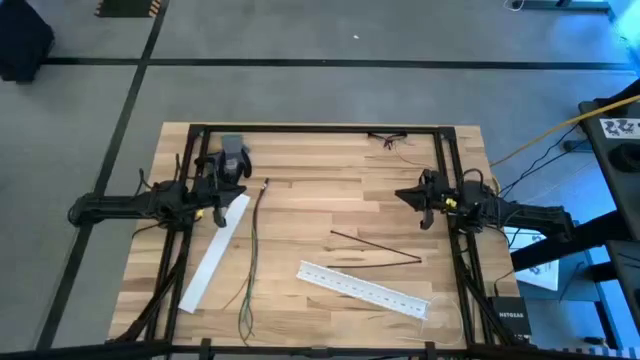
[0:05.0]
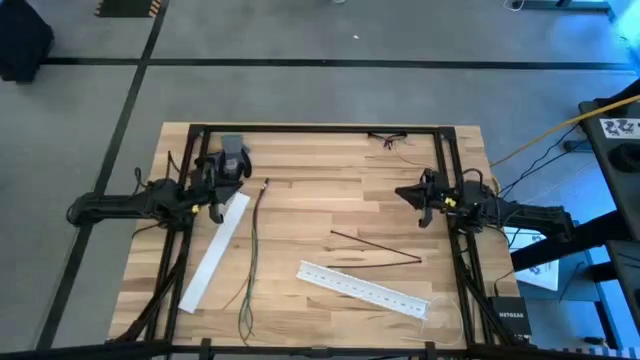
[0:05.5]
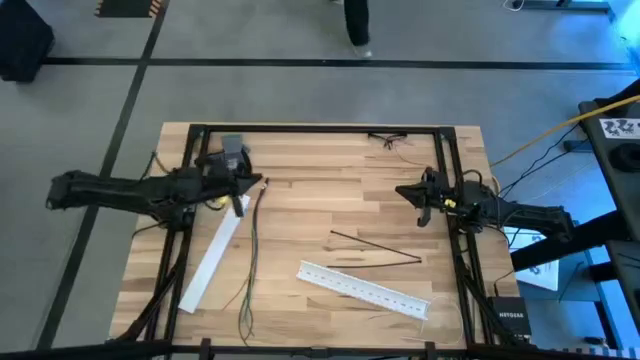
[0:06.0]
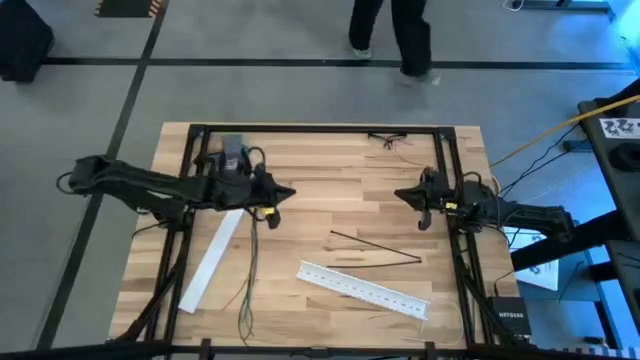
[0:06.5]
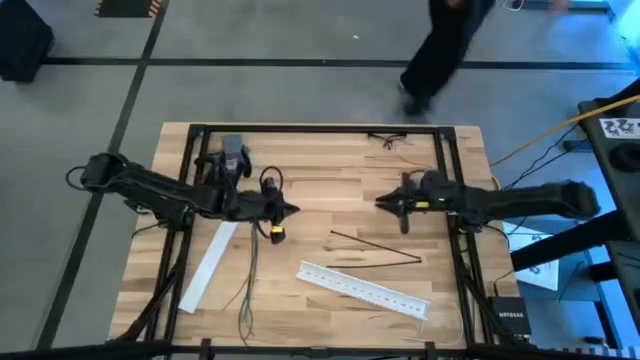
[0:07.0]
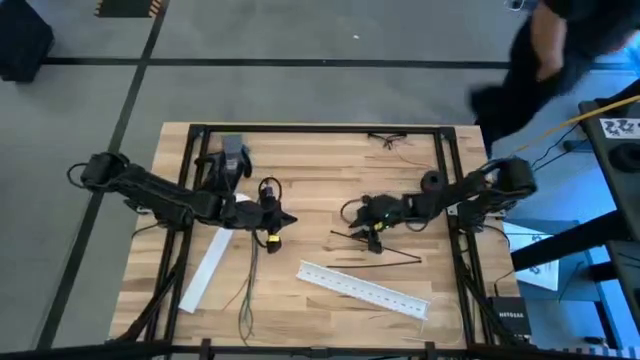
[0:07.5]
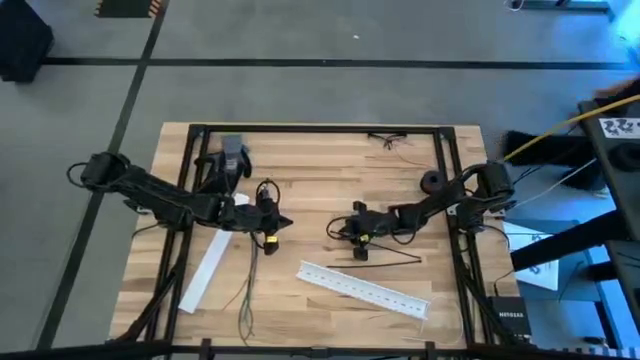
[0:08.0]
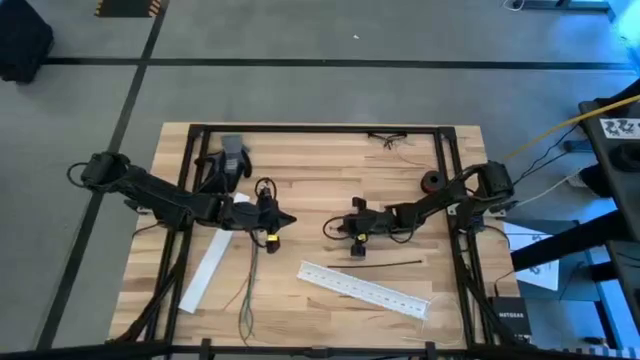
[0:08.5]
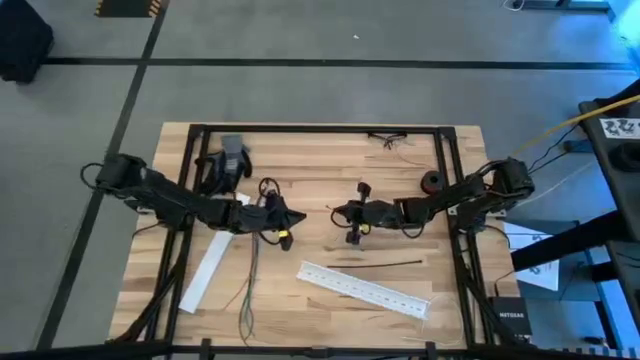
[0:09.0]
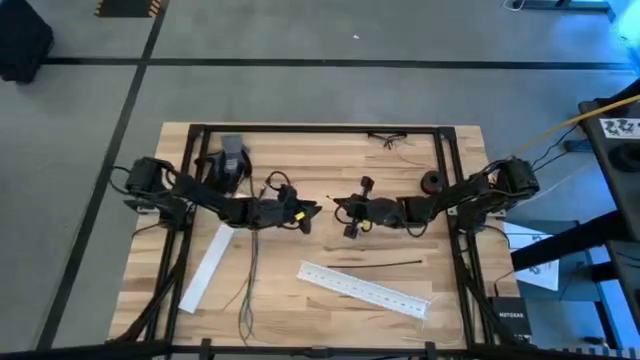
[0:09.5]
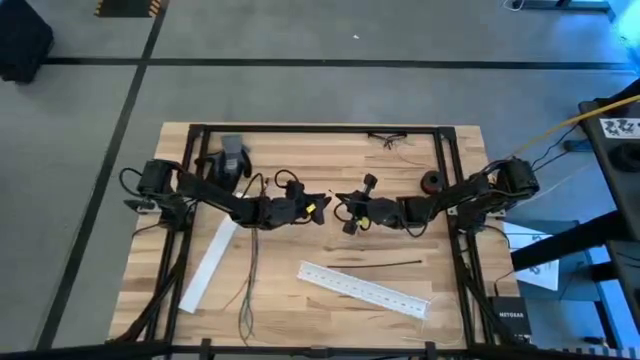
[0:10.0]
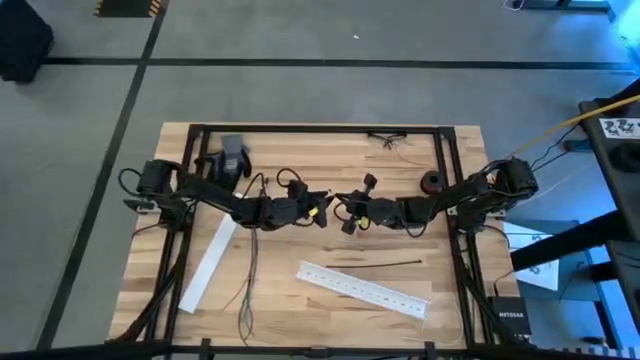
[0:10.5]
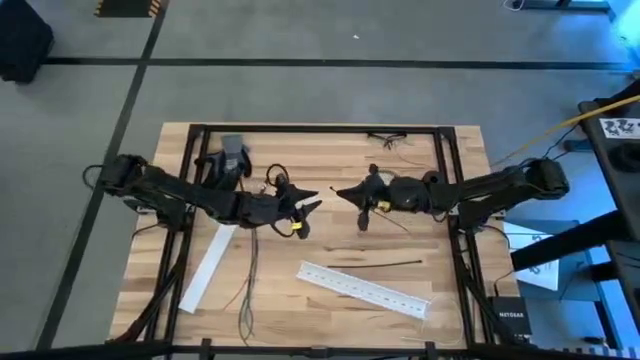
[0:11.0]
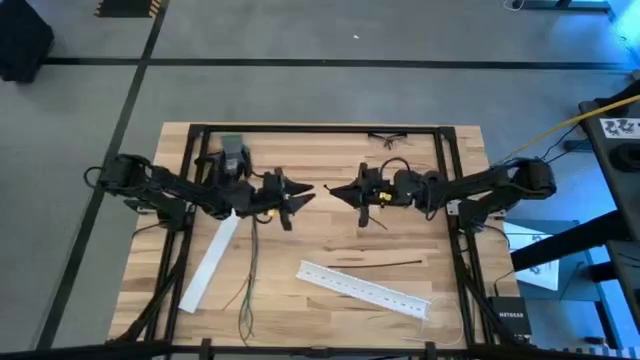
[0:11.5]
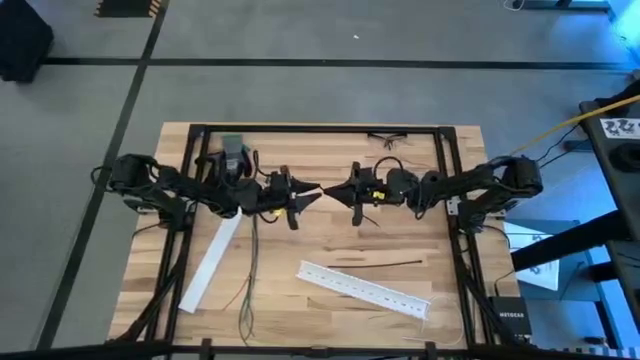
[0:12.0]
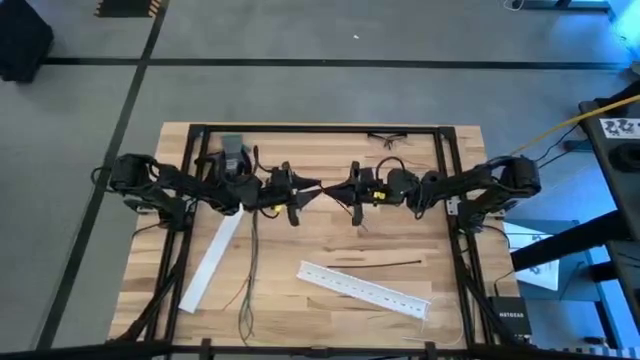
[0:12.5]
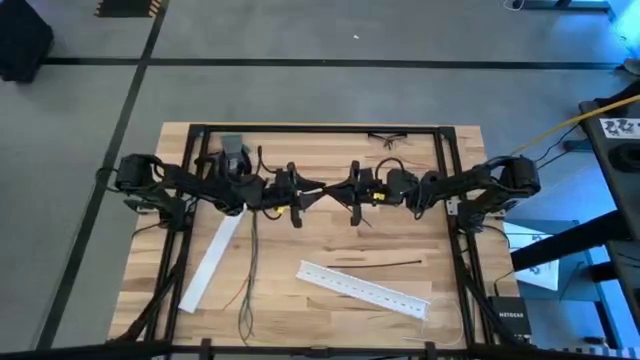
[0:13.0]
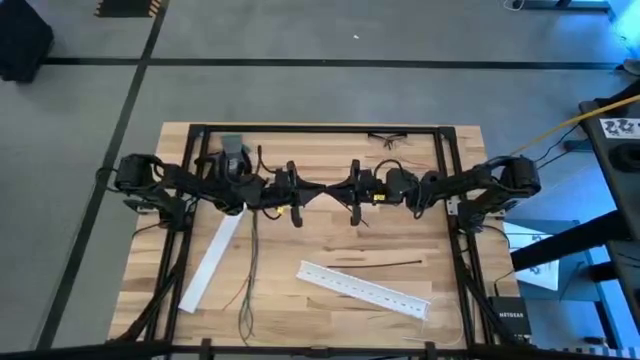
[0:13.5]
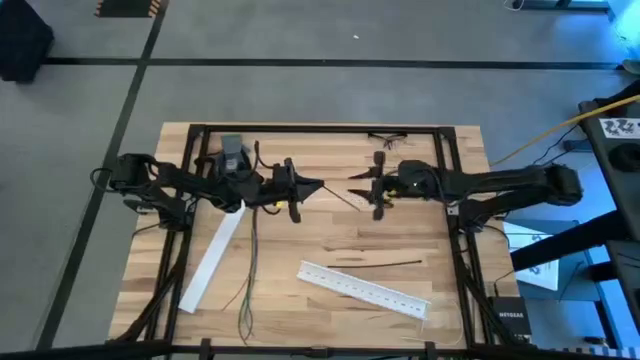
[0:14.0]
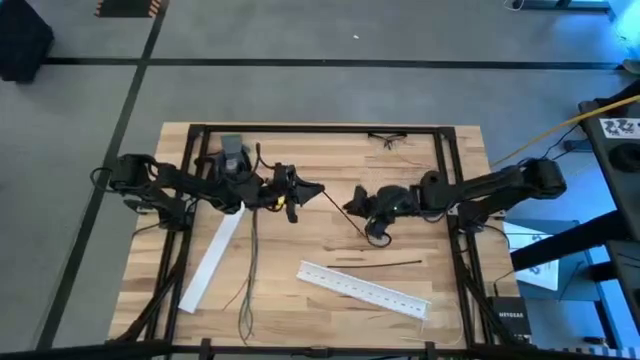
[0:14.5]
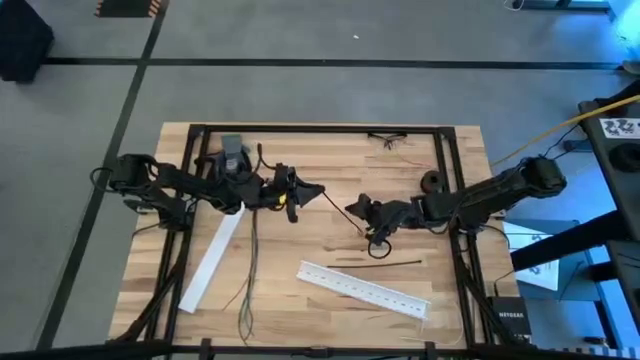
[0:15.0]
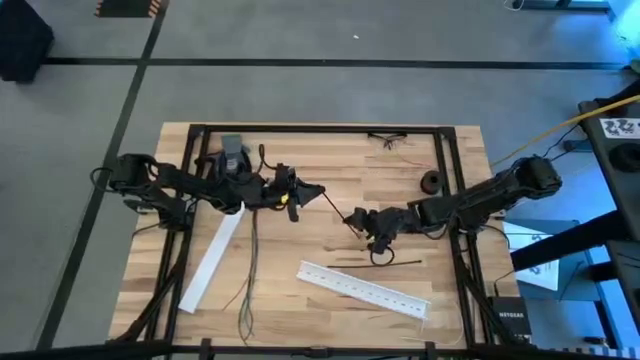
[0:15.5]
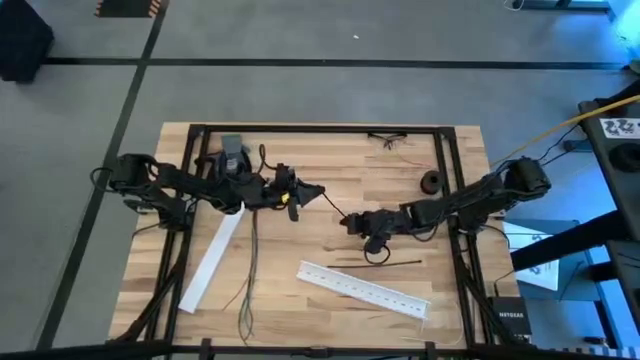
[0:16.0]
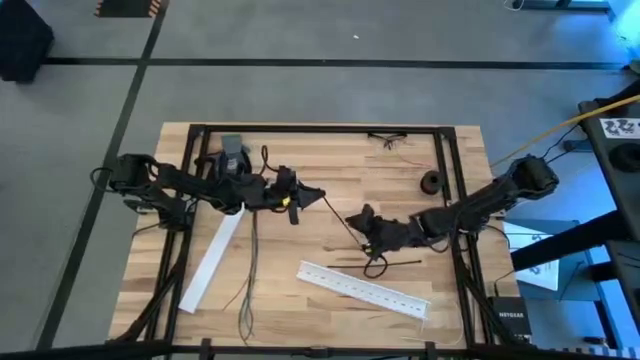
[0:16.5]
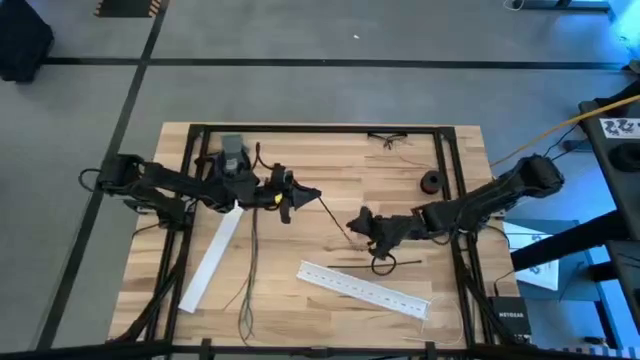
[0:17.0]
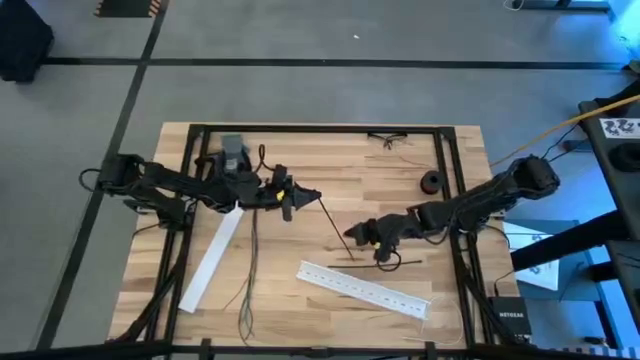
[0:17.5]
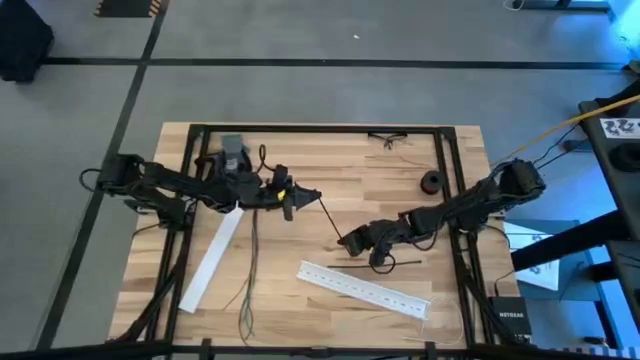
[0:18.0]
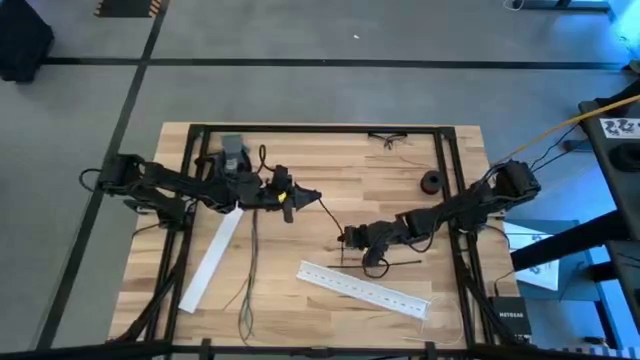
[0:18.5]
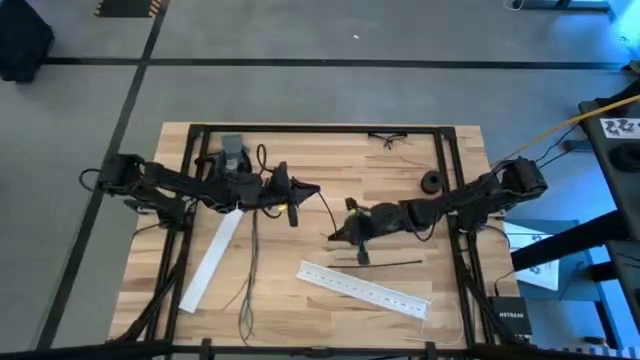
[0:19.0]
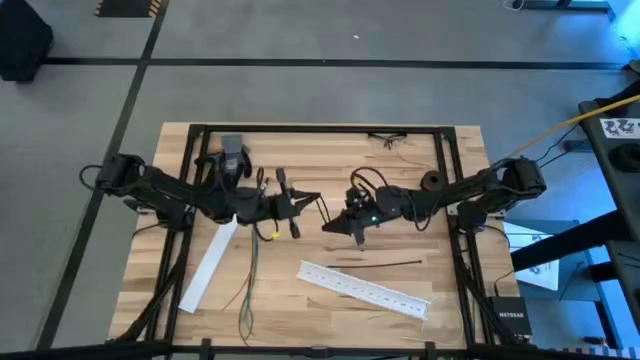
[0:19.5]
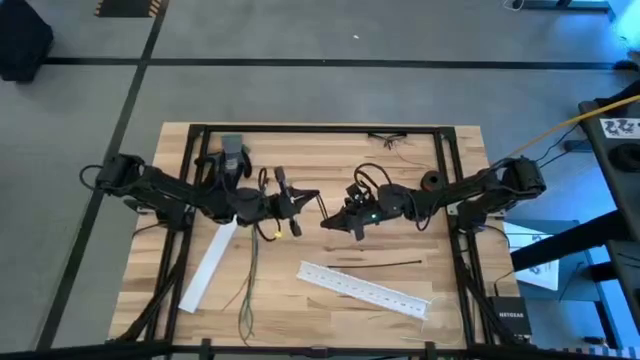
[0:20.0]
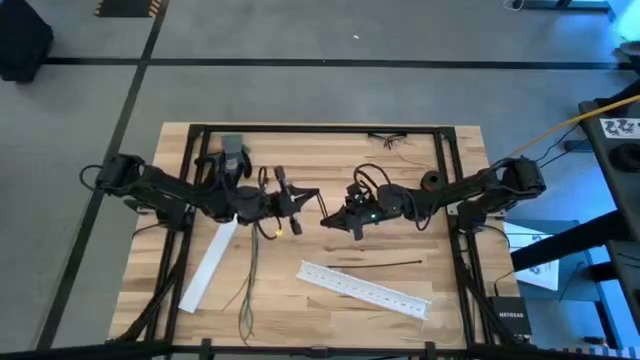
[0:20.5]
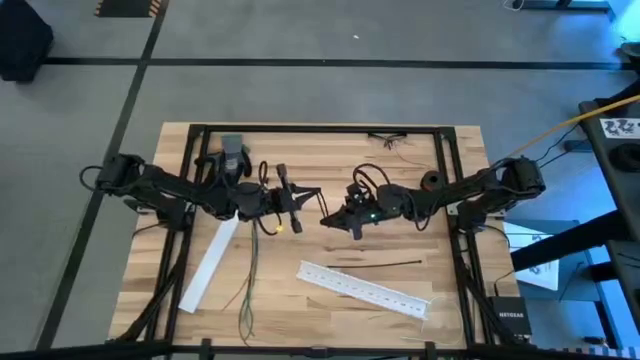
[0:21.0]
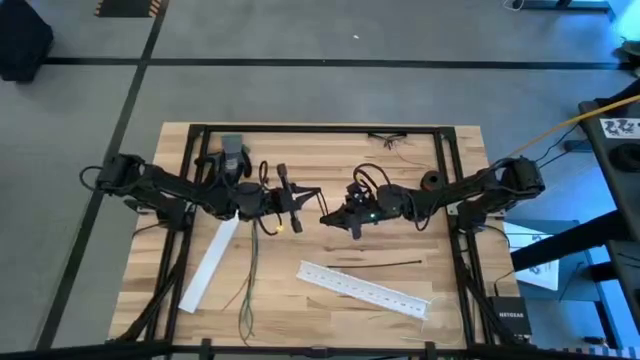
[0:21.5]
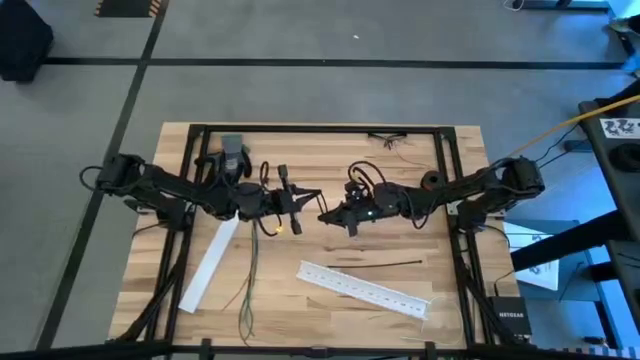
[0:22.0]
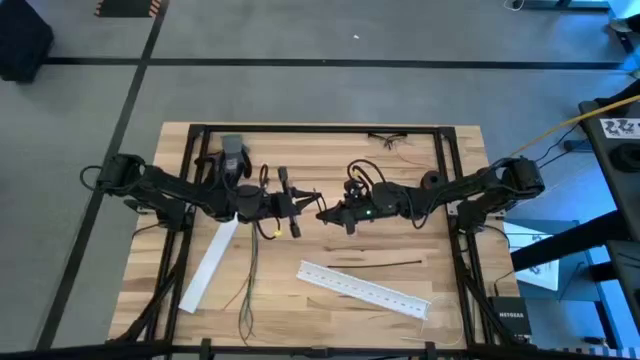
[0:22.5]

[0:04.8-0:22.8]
Task: Ziptie cables
Wrap the cables together using the top zip tie
